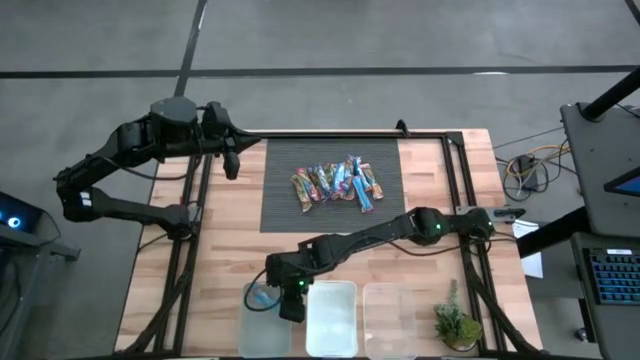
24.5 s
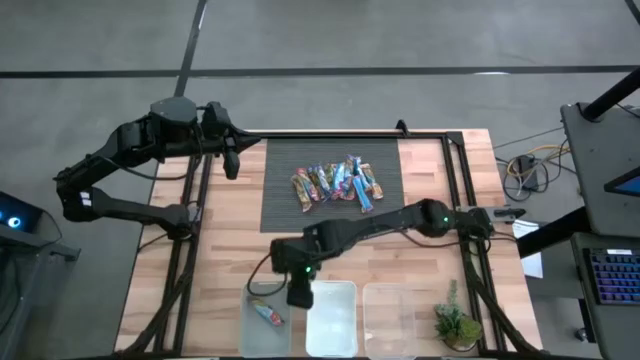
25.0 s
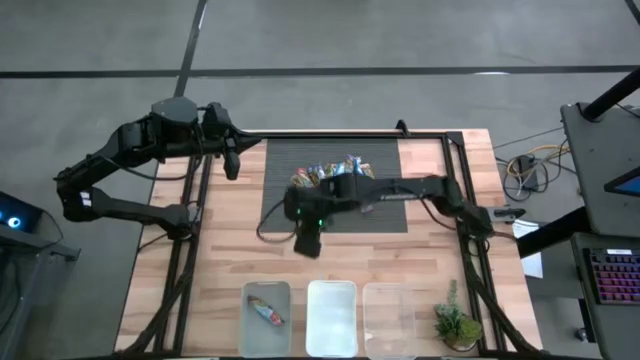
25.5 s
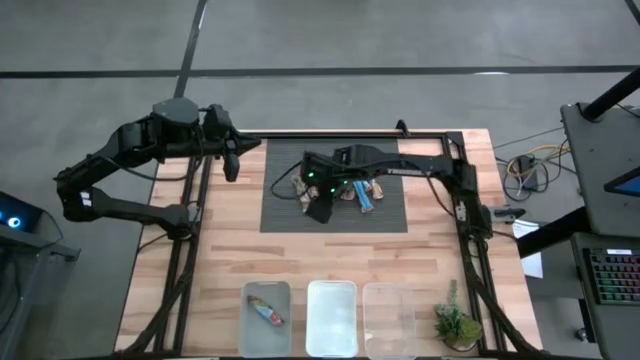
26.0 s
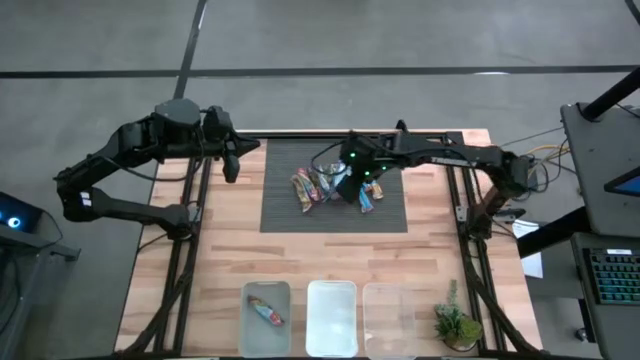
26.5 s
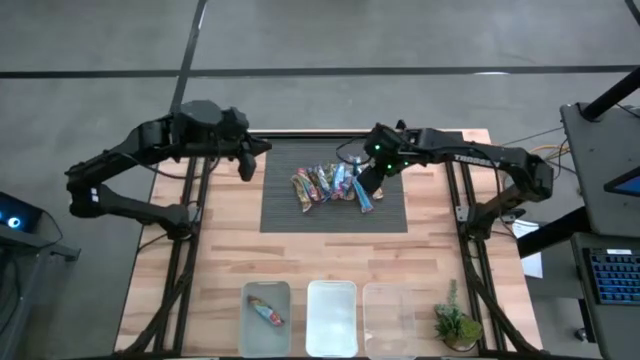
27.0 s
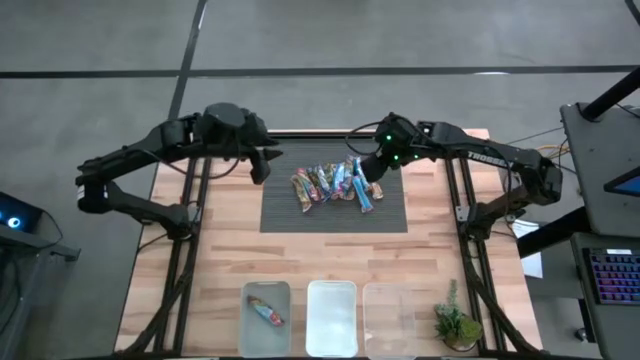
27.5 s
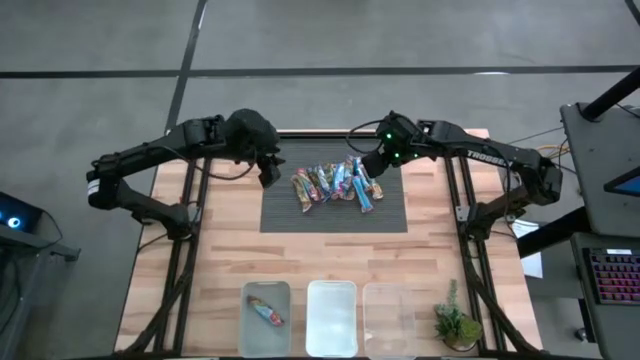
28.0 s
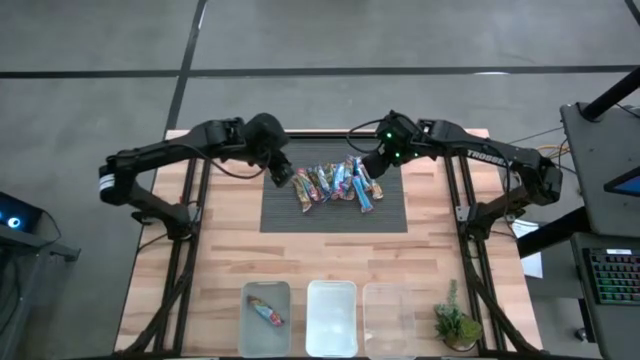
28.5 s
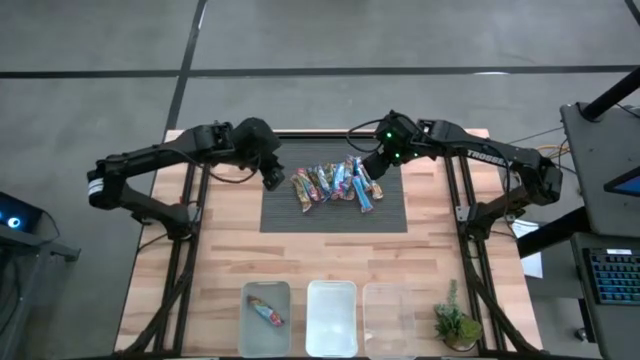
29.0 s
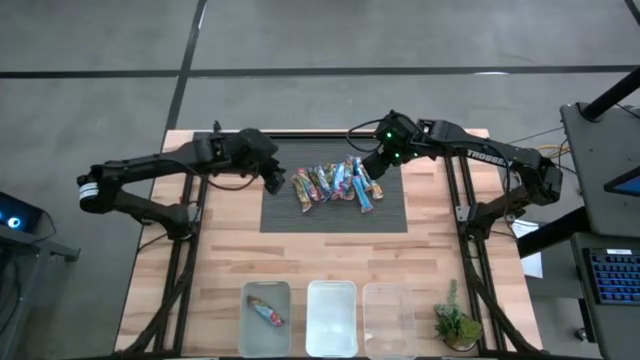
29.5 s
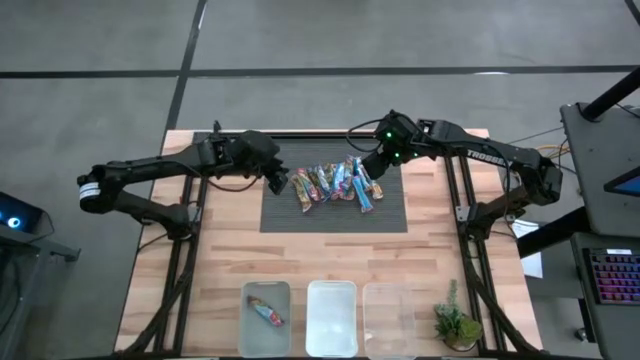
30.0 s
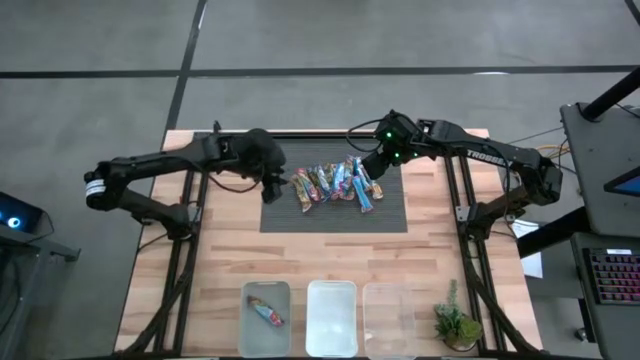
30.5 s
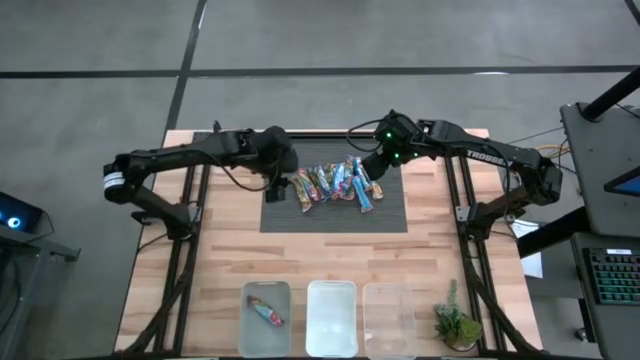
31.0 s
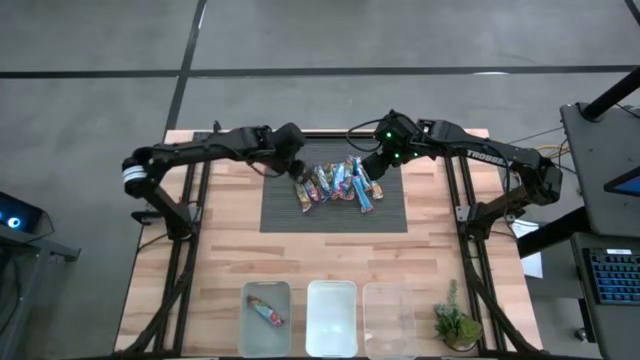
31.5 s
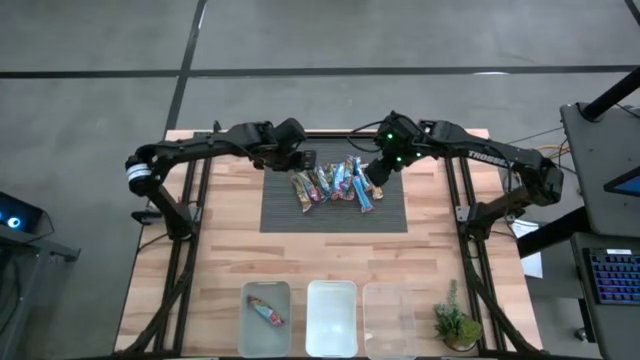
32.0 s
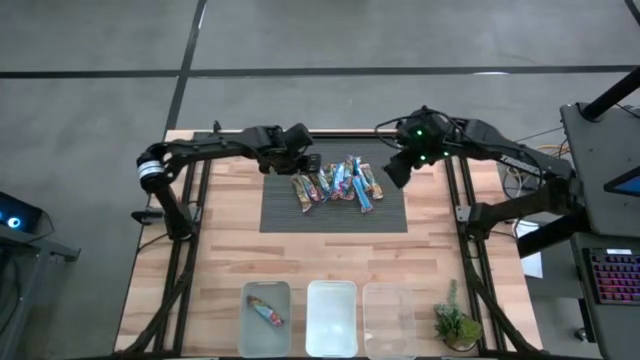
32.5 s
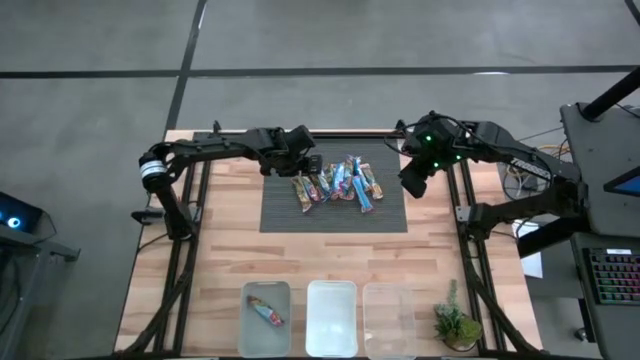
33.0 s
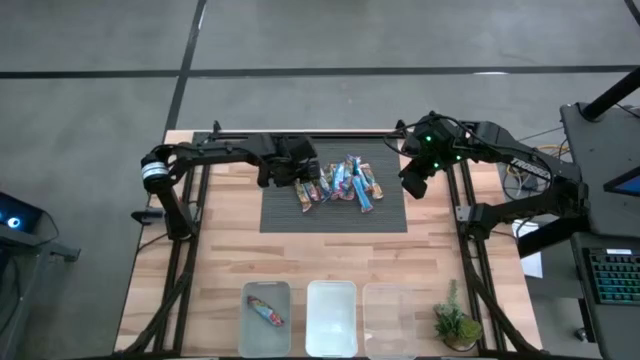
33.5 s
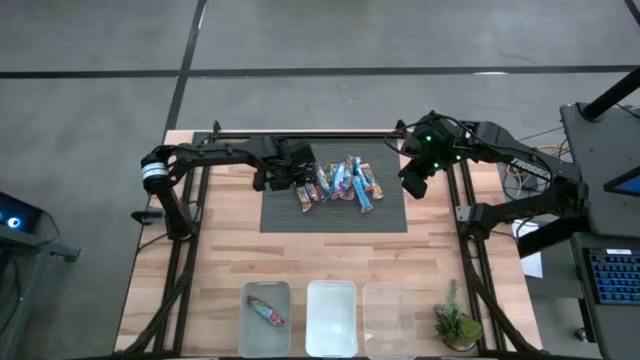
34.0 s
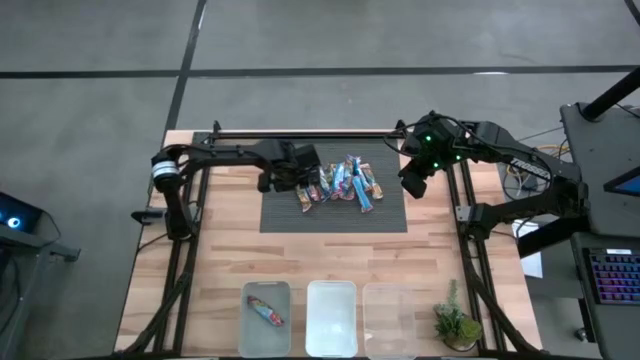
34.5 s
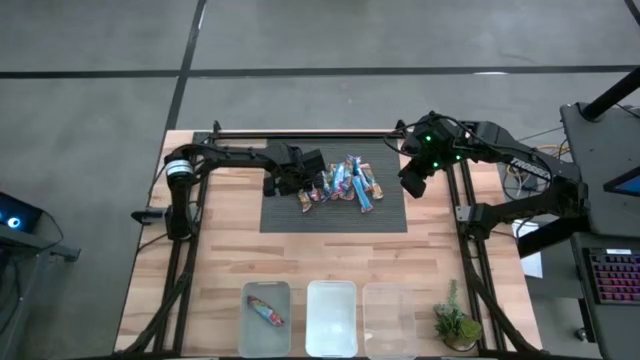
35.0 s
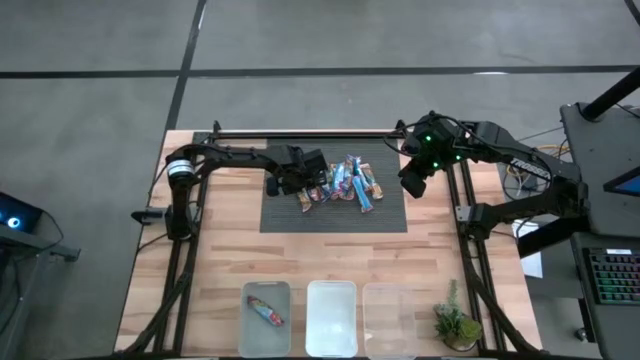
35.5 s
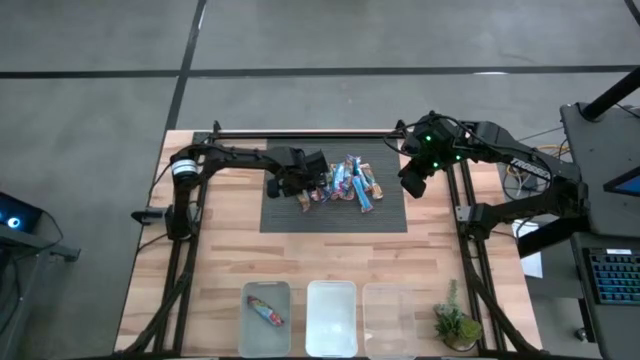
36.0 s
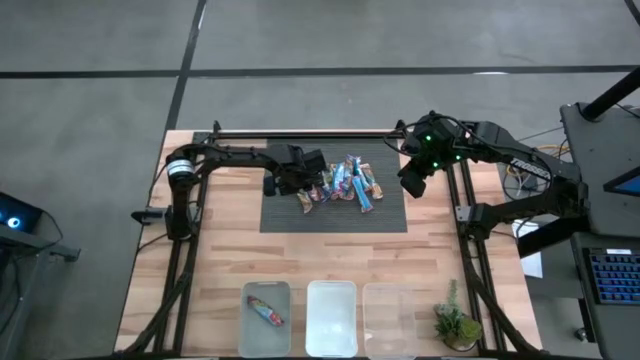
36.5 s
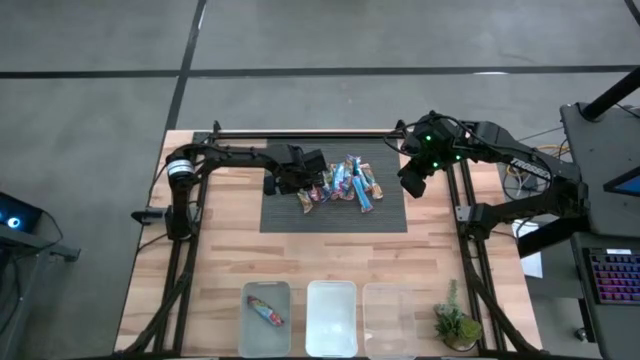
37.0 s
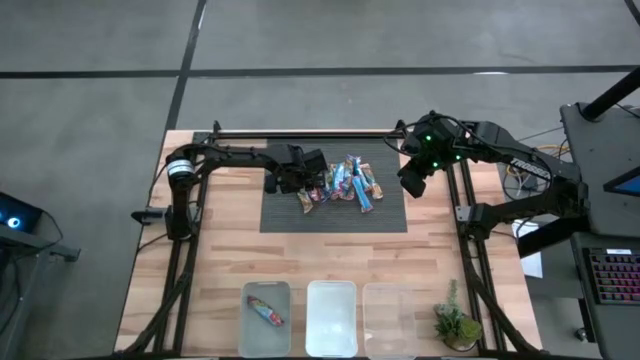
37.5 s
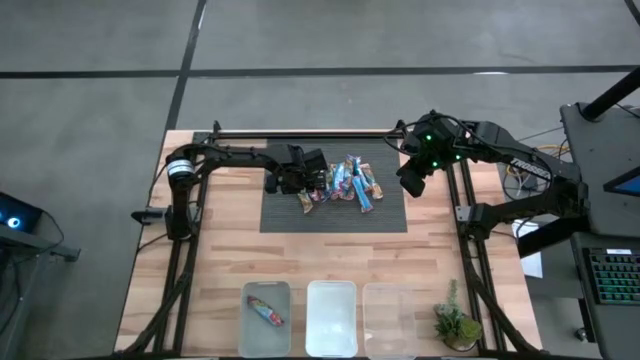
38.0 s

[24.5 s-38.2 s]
Task: Pick and place Granola Bars by type
Put the yellow granola bar into the transparent bin

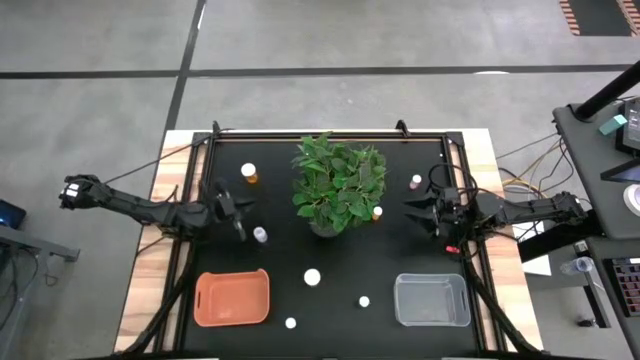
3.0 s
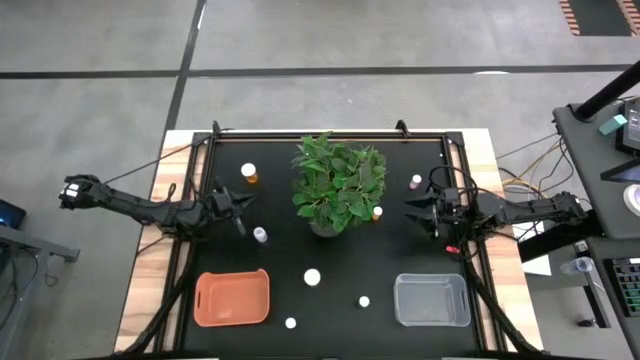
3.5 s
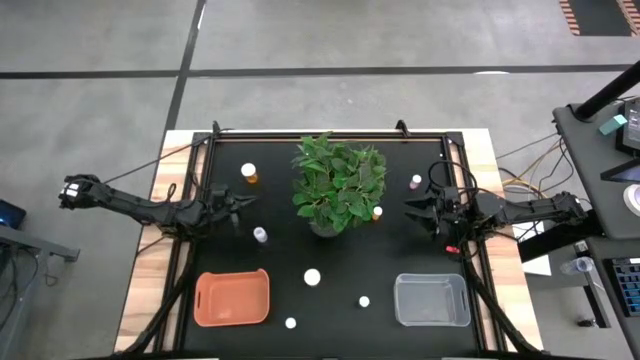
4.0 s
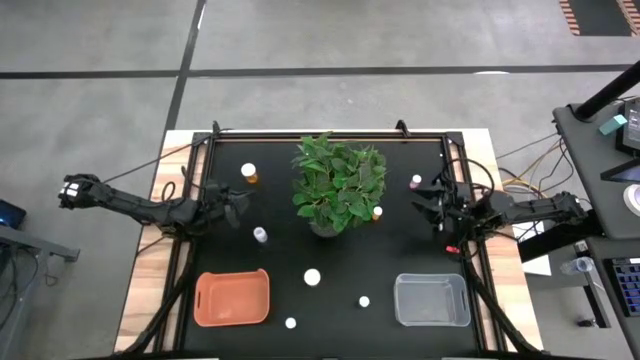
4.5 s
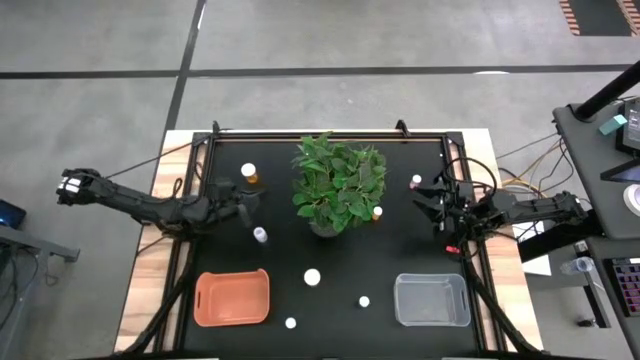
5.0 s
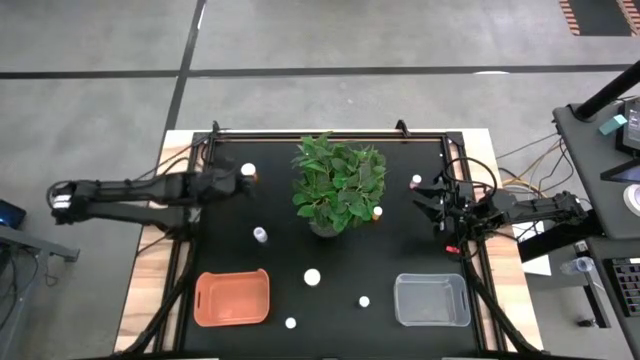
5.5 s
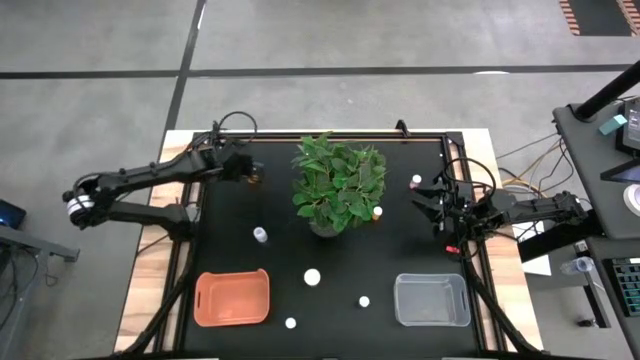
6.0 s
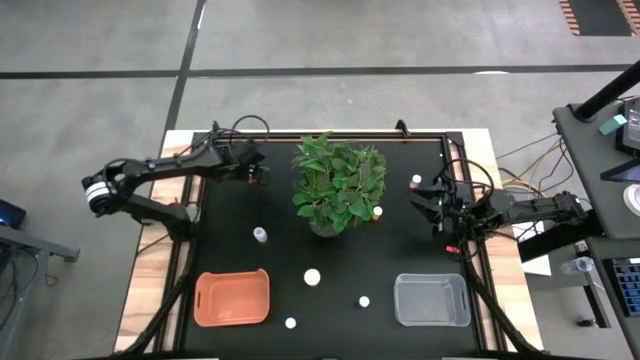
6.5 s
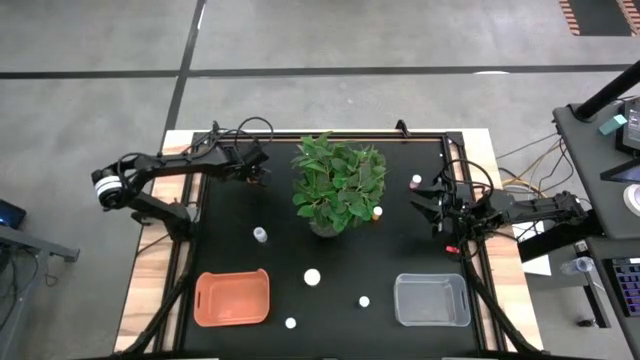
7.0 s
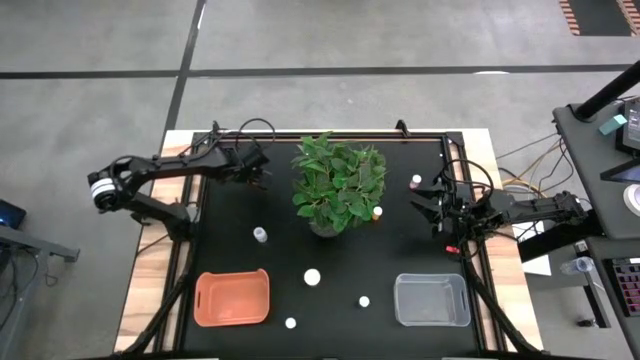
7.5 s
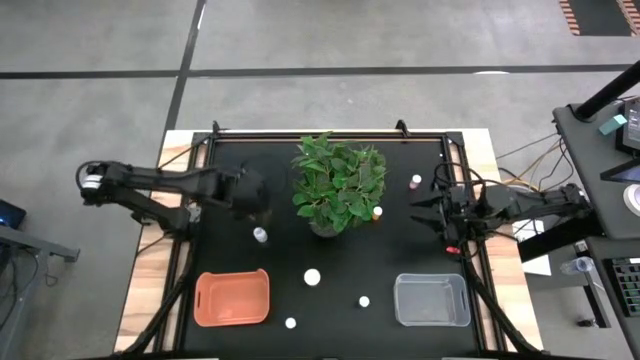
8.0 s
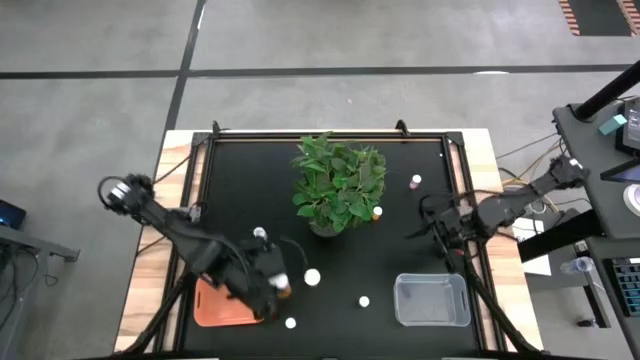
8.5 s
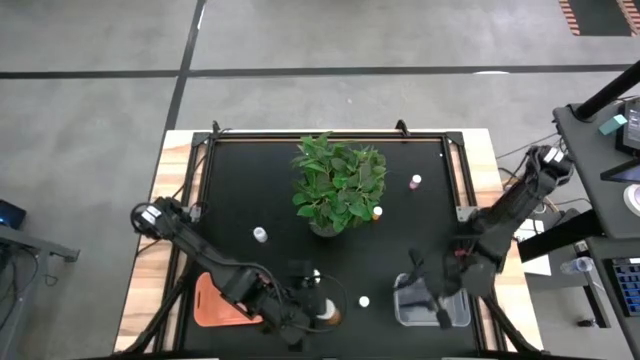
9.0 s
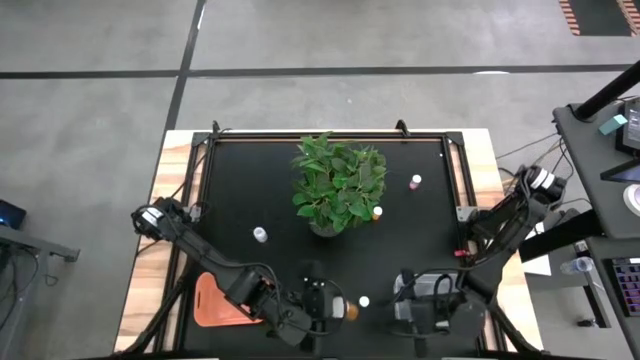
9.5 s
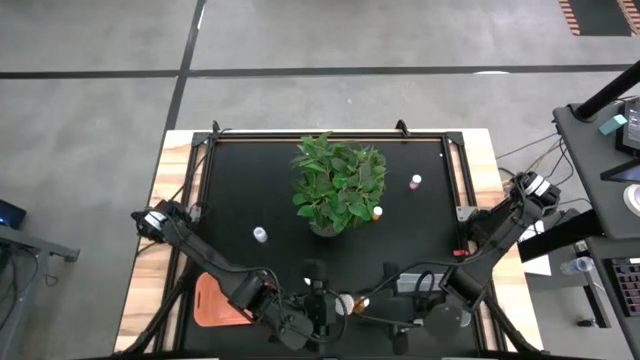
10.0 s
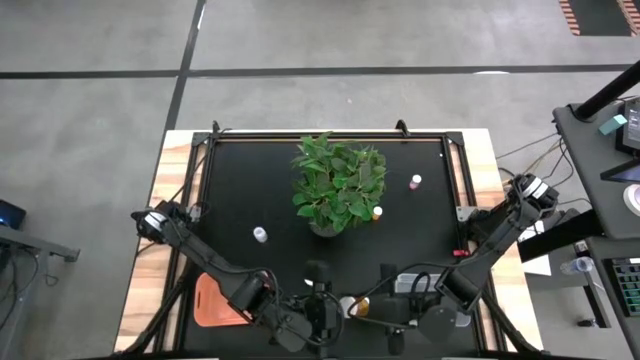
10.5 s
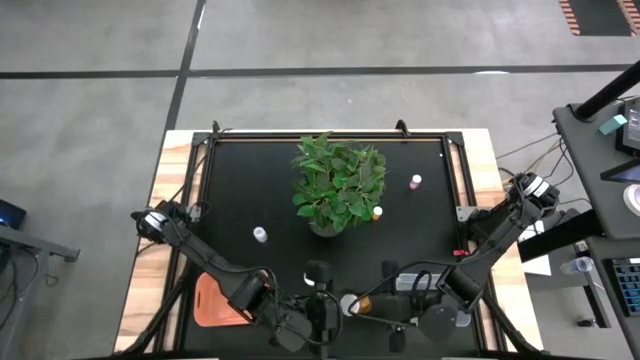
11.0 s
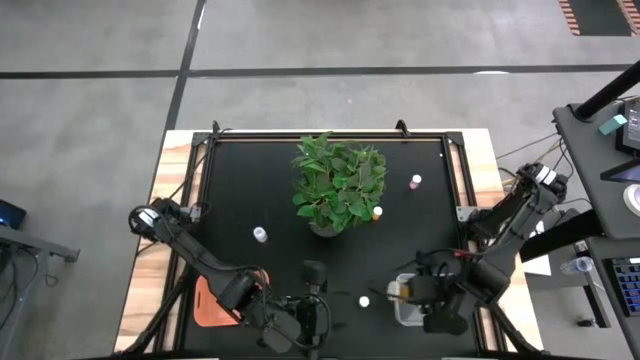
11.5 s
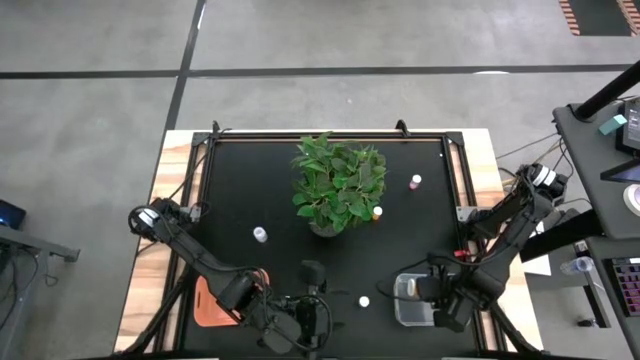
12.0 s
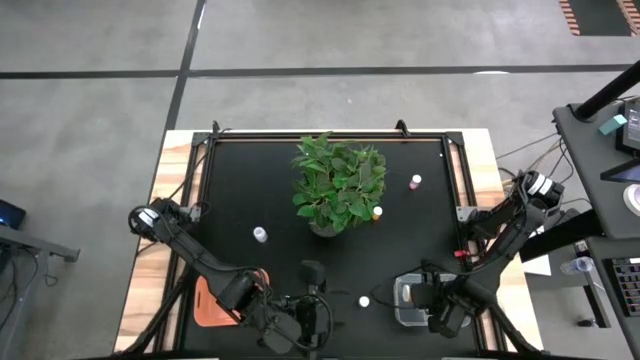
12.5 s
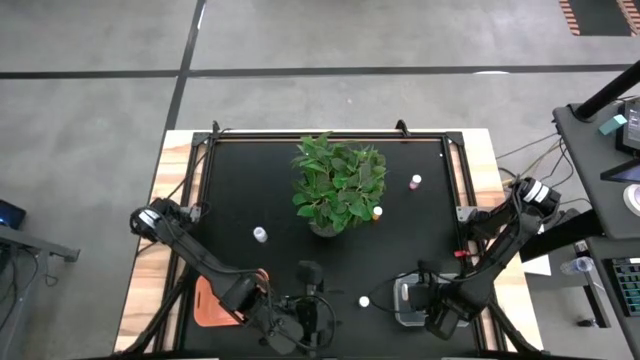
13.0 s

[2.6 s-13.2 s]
Task: Pick and place medicine bottles into bin by pill shape (circle, oval)
Put the top orange capsule bottle into the transparent bin
